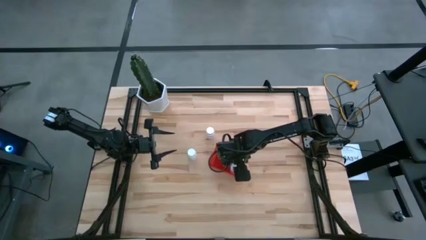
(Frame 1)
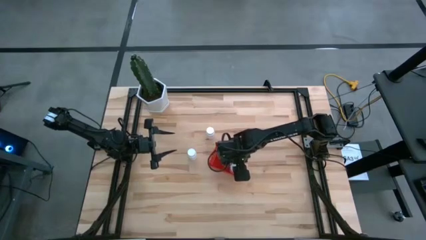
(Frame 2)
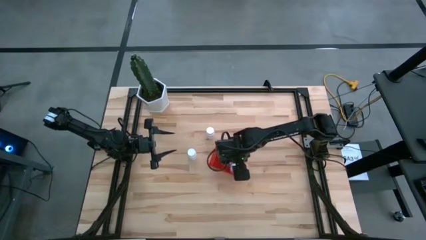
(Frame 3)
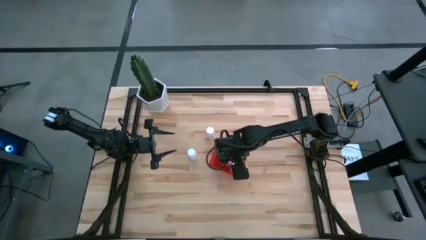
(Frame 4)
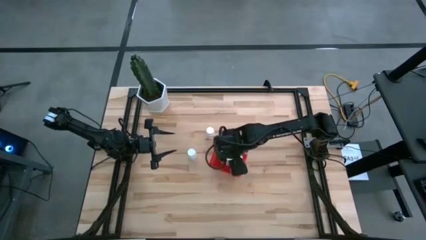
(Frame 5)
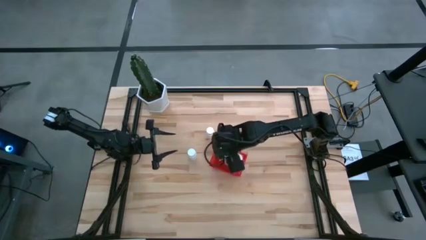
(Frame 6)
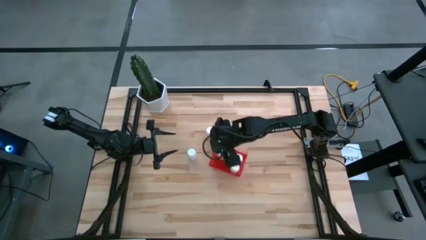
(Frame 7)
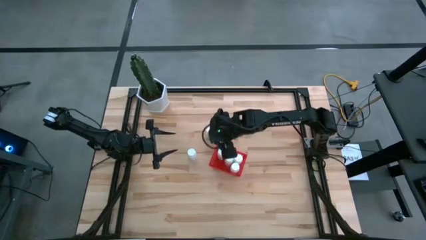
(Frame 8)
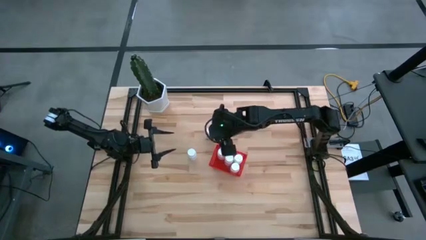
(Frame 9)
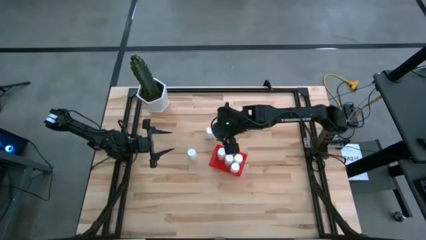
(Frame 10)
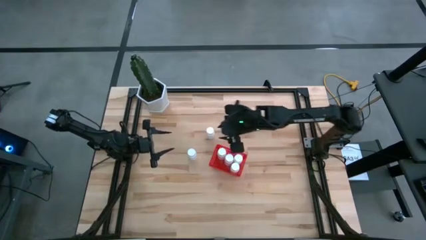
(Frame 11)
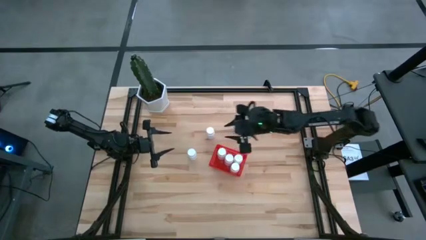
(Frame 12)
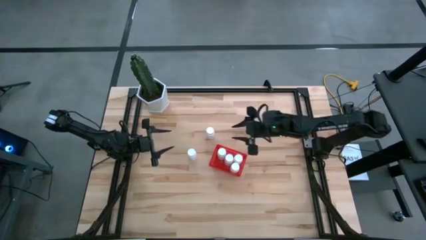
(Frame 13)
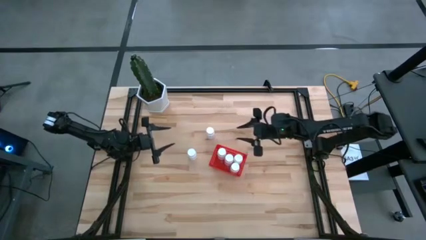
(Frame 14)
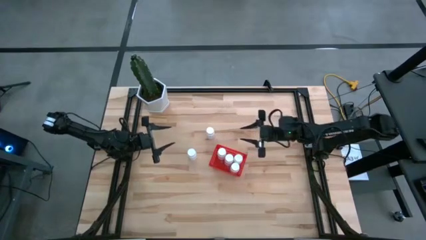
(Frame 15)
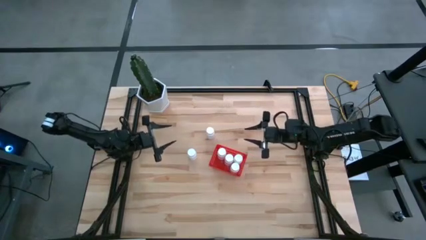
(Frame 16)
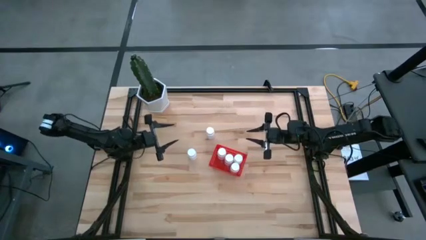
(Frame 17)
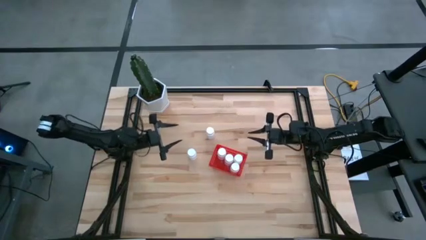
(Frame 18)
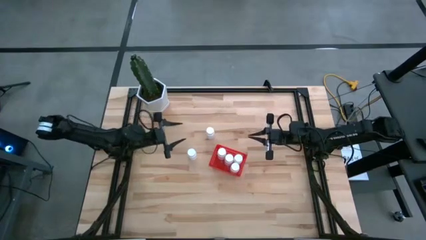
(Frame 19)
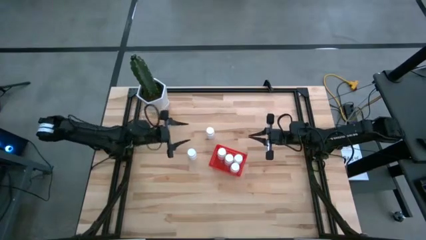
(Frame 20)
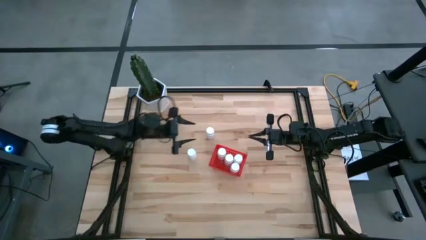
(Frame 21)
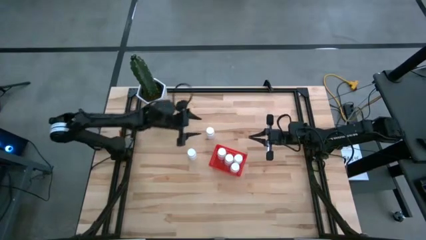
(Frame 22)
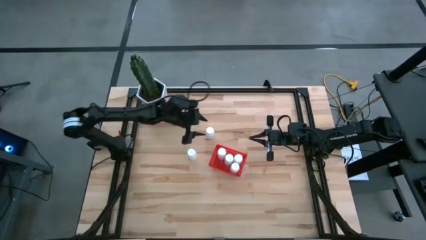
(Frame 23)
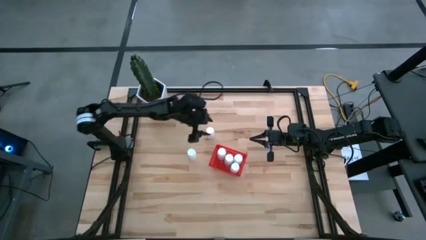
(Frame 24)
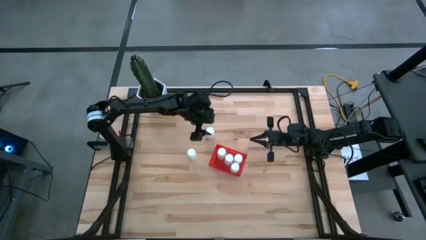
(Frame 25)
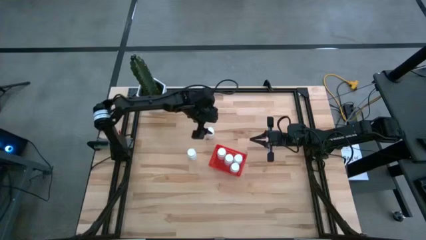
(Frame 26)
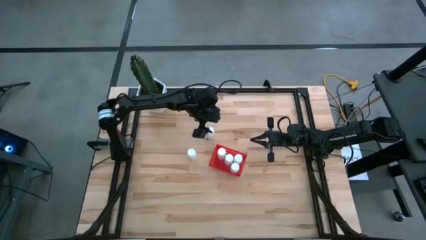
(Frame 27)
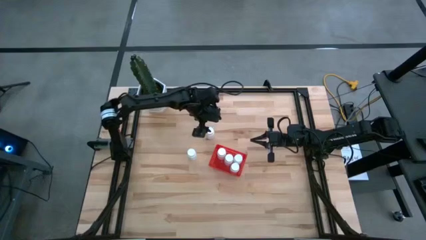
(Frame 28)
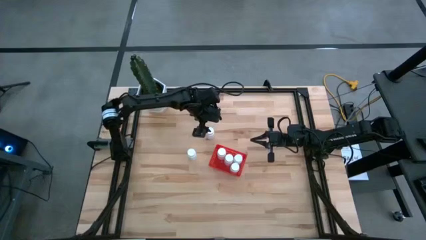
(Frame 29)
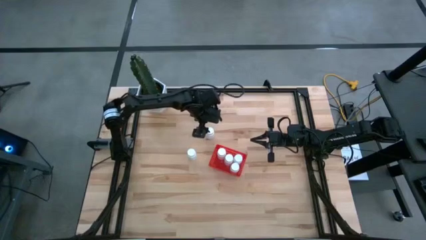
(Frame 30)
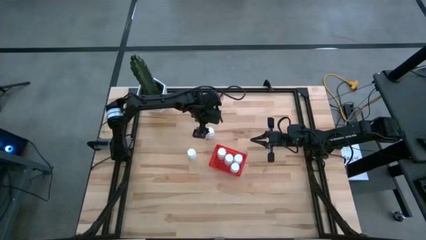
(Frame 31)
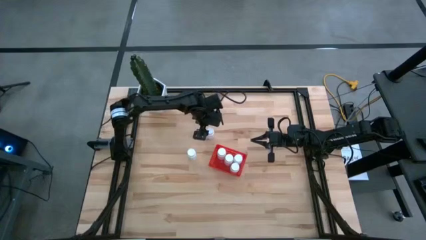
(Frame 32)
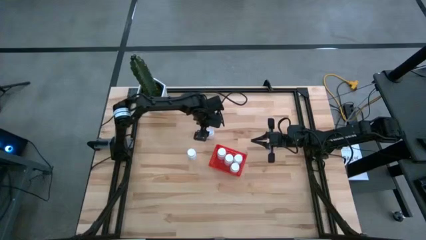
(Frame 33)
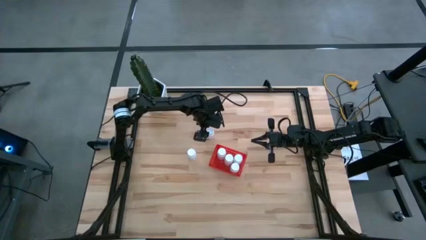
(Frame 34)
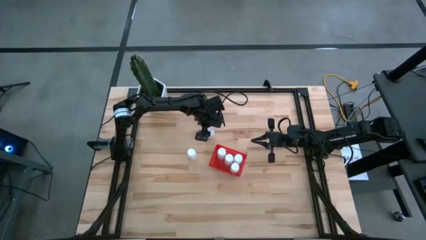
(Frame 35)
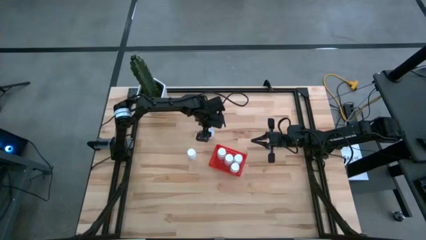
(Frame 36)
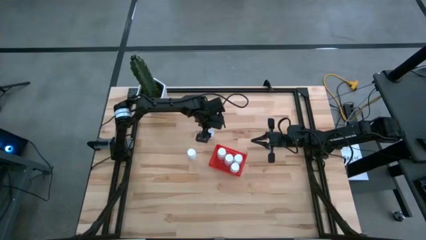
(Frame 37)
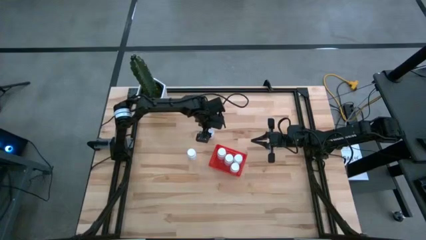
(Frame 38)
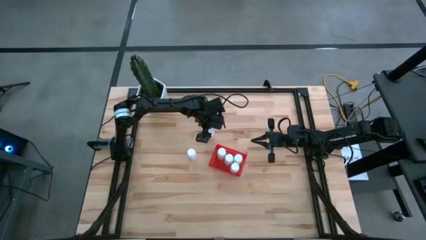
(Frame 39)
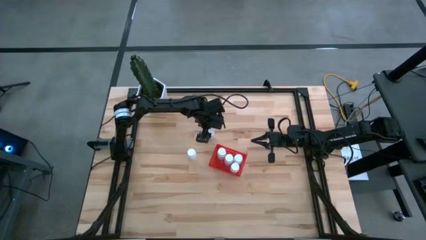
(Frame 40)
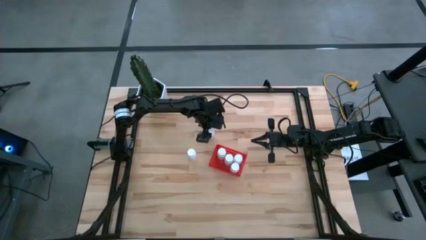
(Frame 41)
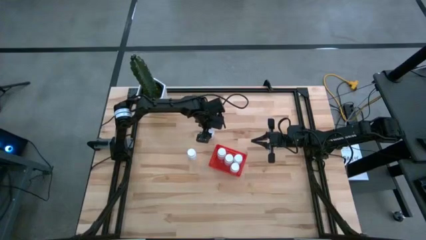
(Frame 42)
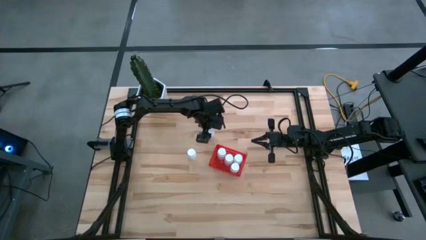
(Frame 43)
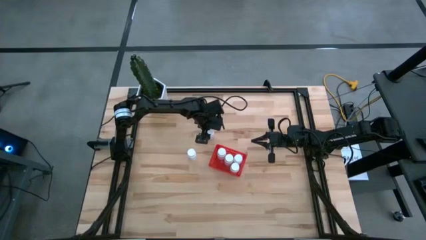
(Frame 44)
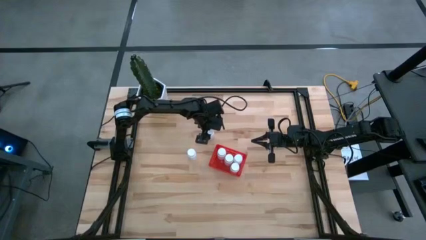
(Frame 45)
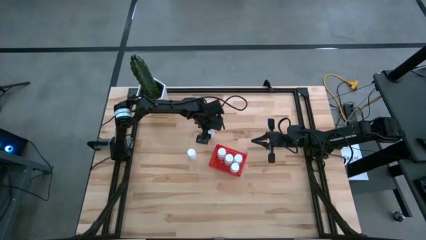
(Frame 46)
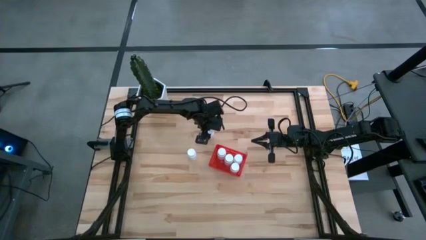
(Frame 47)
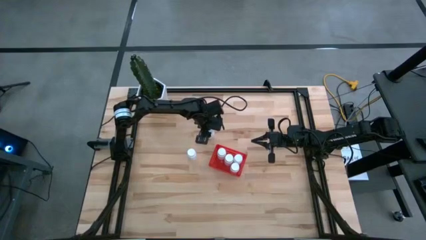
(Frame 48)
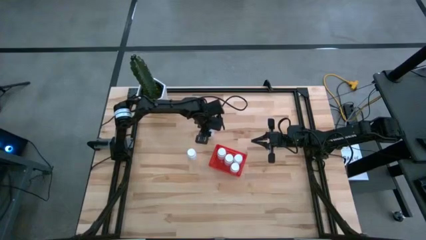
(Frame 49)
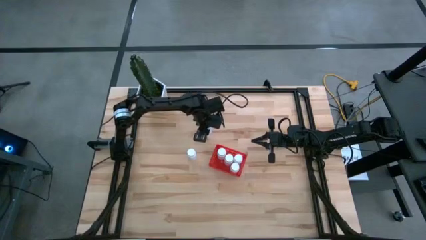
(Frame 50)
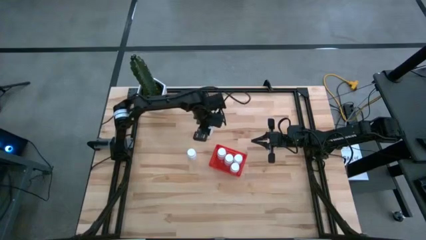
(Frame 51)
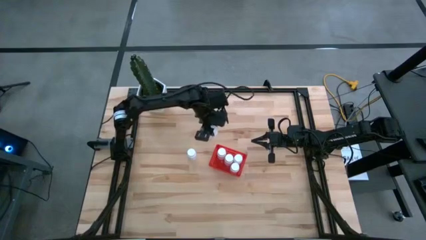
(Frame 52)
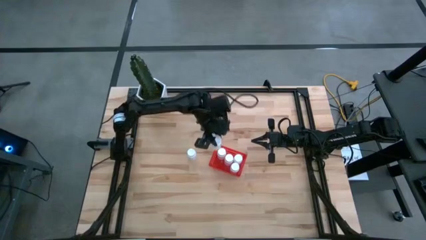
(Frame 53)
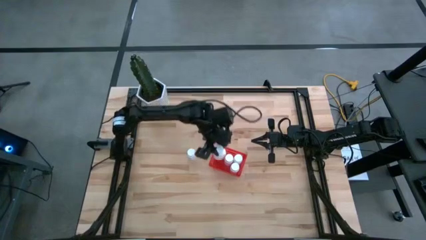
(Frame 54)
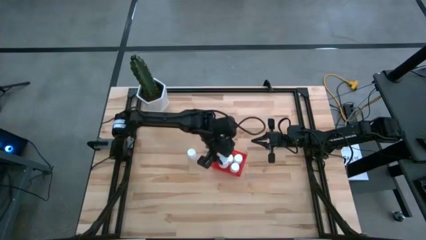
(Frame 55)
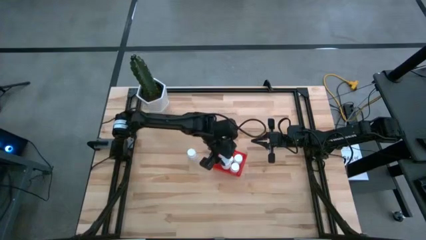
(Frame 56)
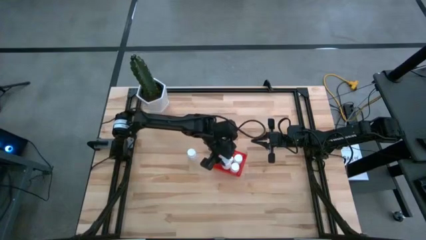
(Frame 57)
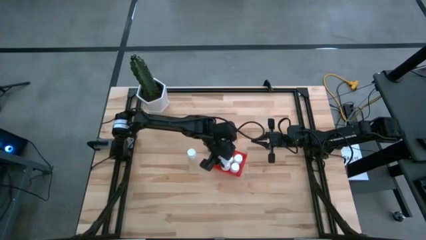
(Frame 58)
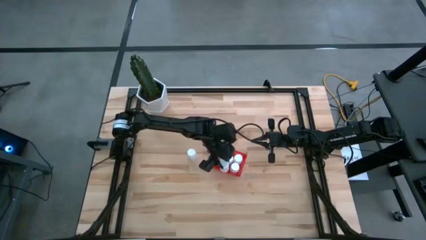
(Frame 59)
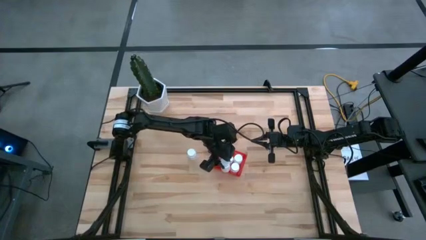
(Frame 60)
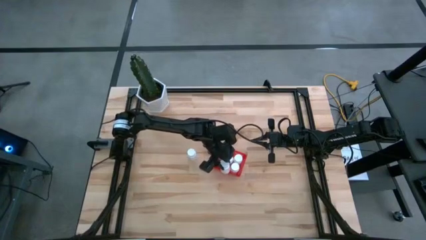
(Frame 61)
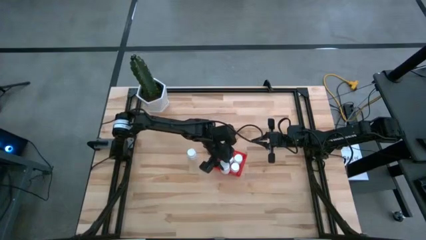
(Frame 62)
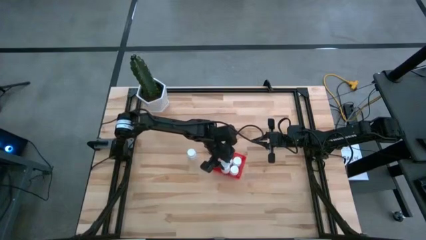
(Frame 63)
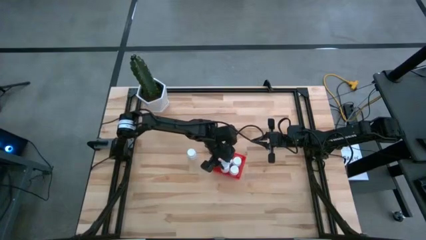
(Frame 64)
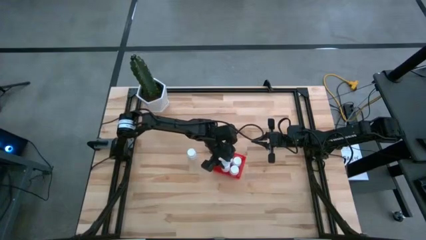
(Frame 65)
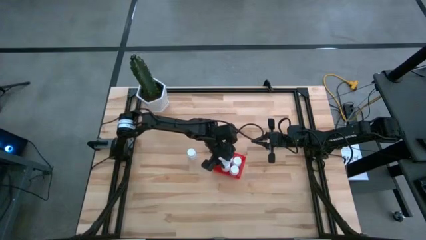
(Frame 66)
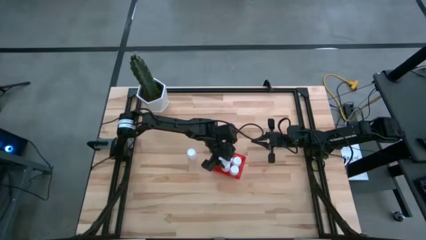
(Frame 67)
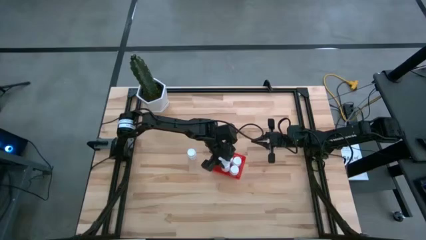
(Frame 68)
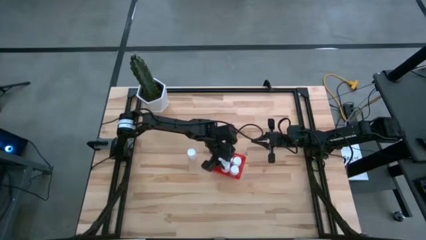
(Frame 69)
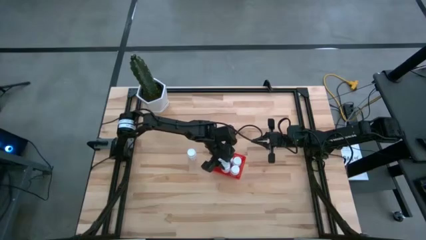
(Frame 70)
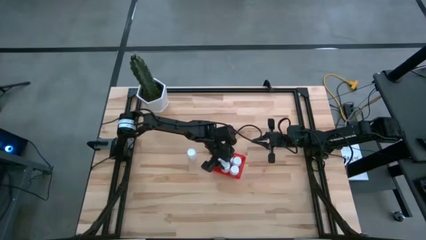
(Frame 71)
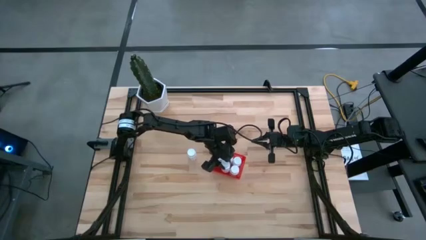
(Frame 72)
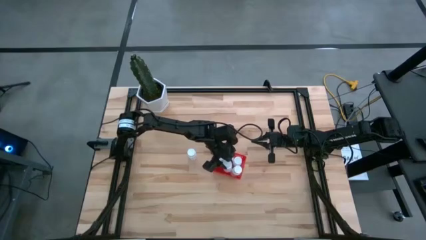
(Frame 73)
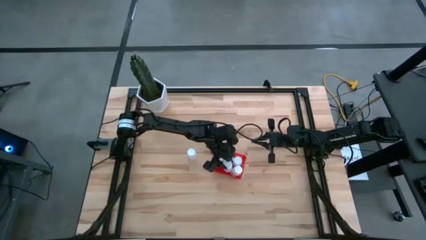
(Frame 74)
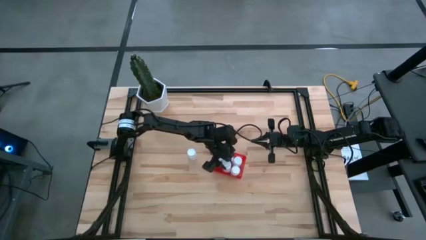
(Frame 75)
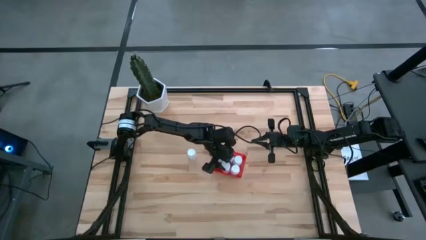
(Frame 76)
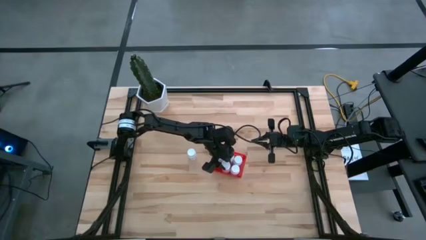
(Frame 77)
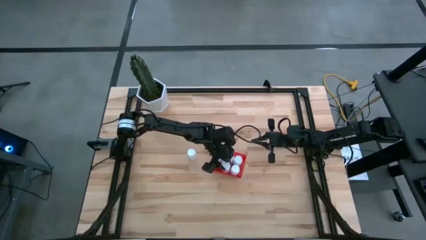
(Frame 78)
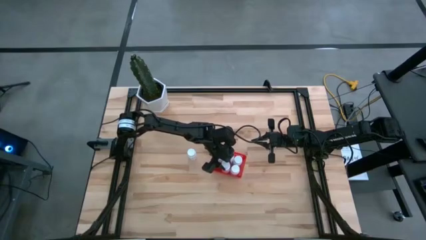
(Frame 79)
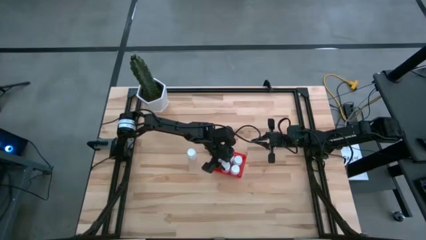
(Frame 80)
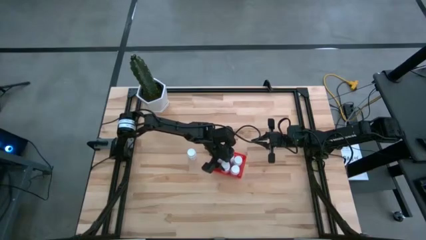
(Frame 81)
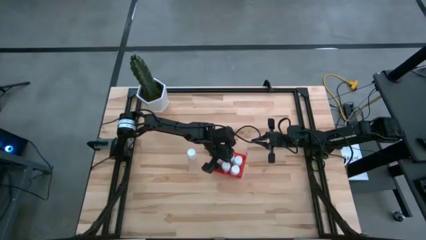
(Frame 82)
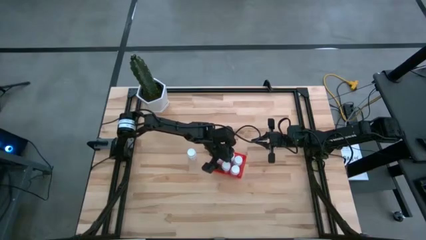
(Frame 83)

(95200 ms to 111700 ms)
Task: Pick and place pill bottles into a basket
Put the white pill bottle into the red bin
